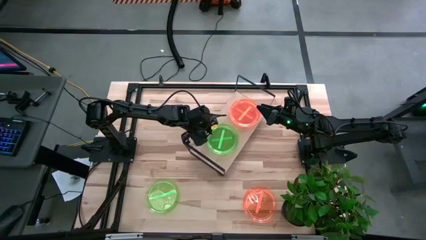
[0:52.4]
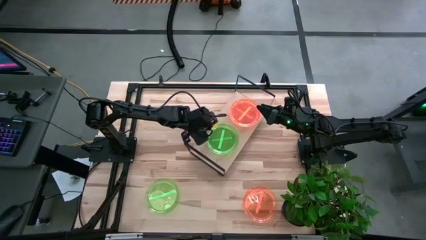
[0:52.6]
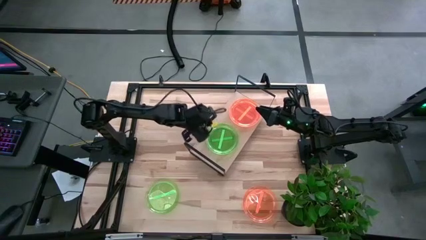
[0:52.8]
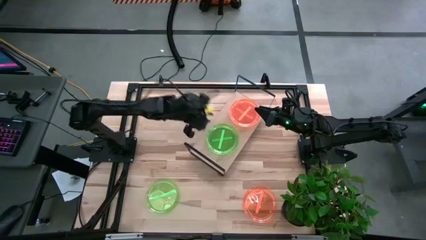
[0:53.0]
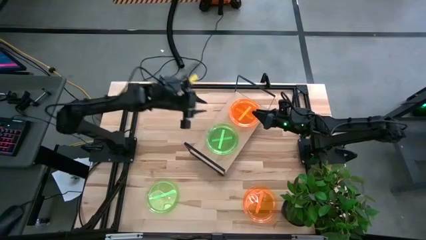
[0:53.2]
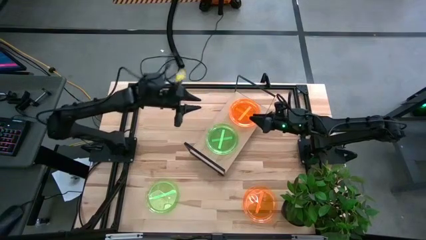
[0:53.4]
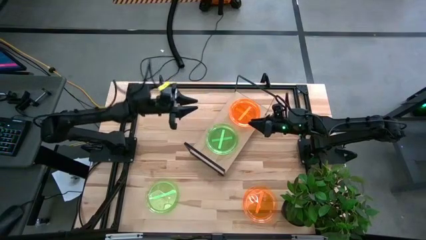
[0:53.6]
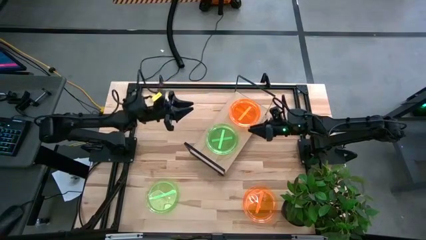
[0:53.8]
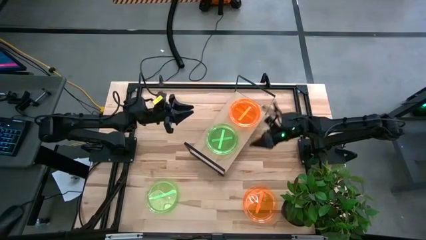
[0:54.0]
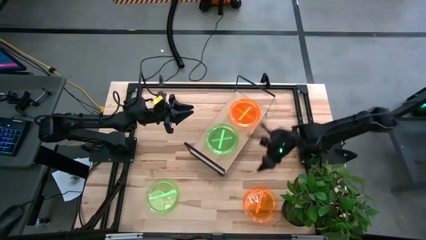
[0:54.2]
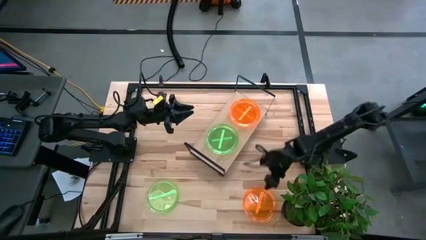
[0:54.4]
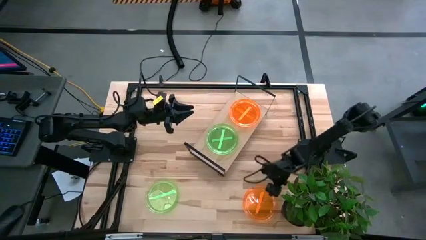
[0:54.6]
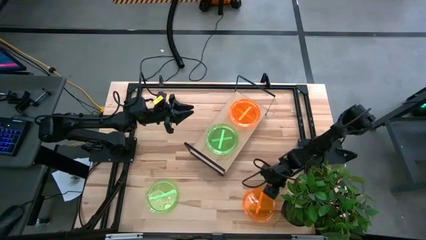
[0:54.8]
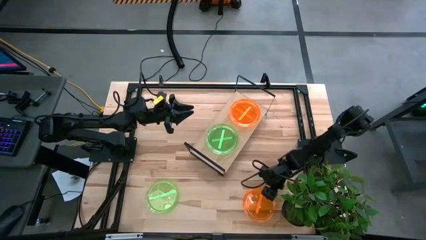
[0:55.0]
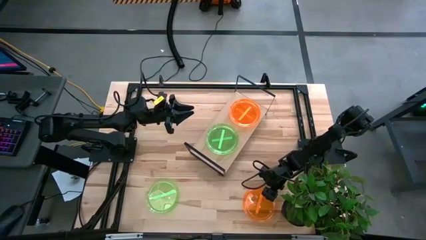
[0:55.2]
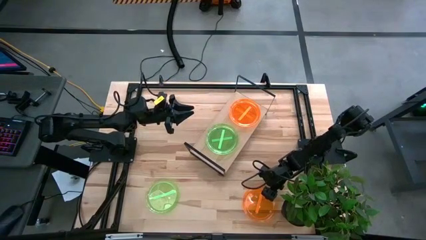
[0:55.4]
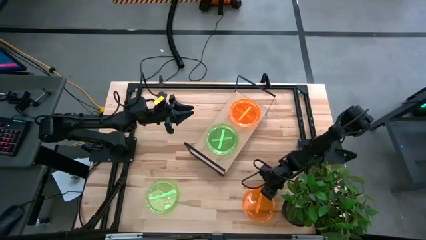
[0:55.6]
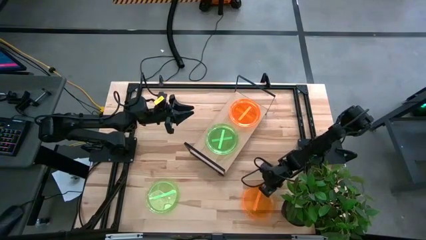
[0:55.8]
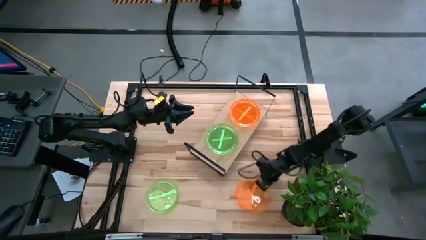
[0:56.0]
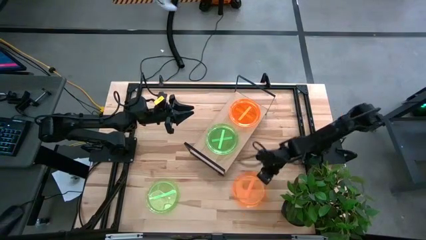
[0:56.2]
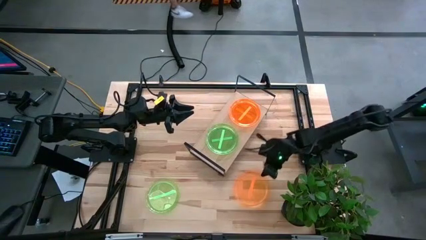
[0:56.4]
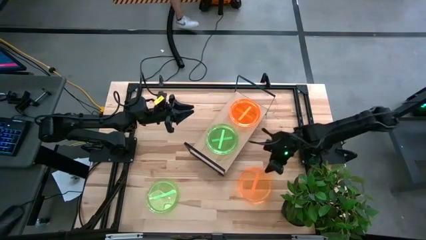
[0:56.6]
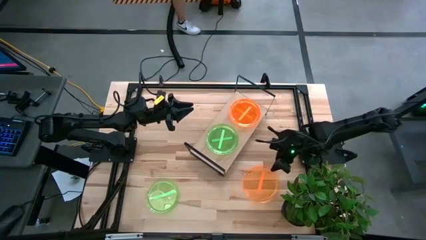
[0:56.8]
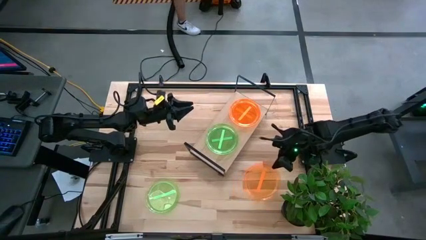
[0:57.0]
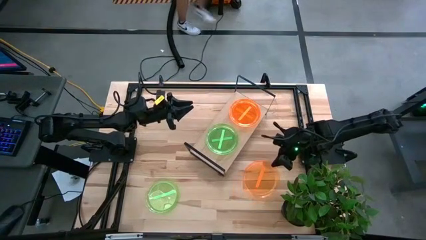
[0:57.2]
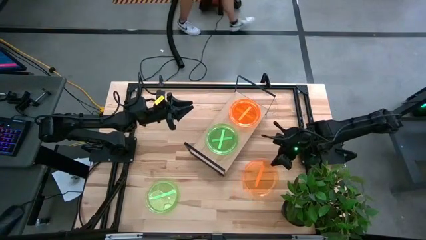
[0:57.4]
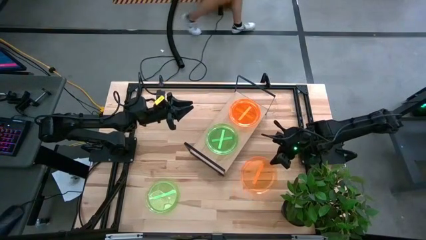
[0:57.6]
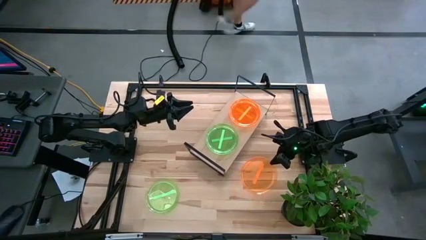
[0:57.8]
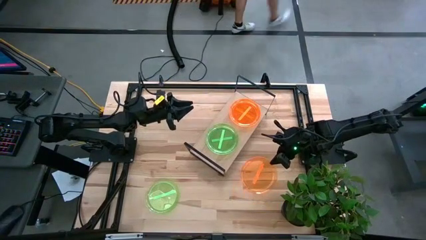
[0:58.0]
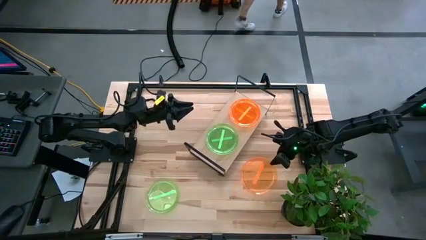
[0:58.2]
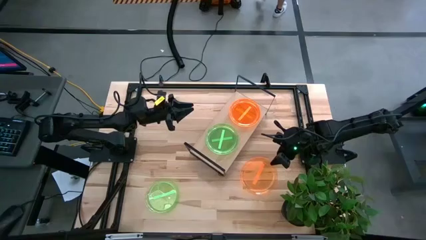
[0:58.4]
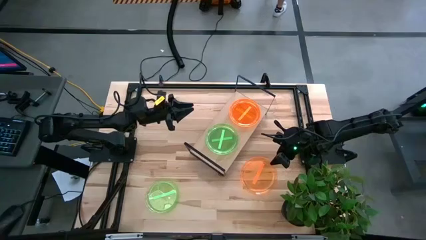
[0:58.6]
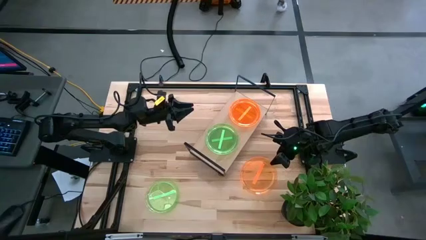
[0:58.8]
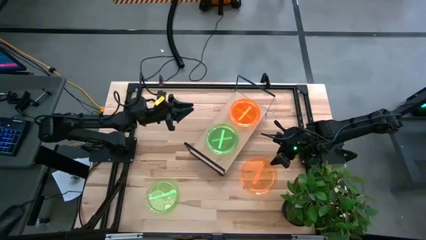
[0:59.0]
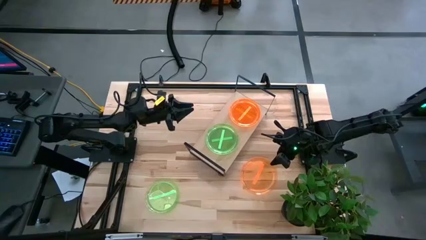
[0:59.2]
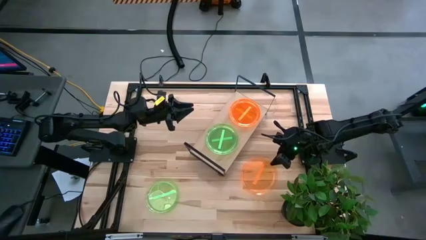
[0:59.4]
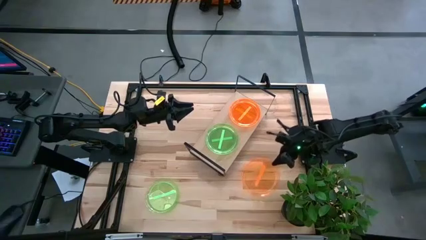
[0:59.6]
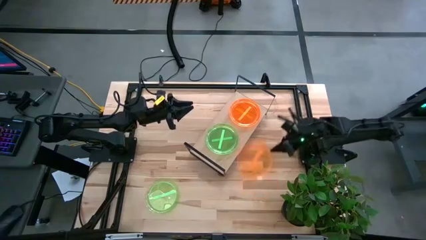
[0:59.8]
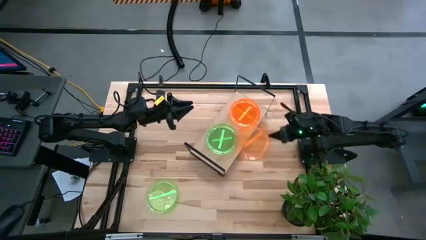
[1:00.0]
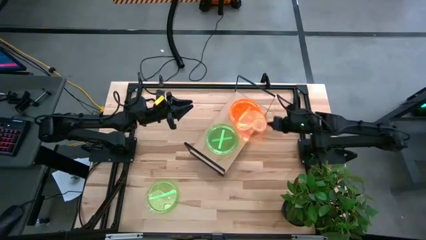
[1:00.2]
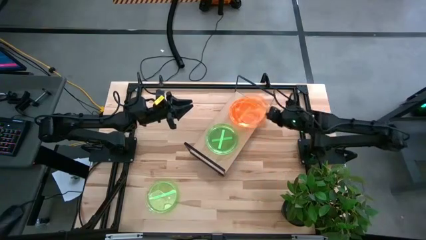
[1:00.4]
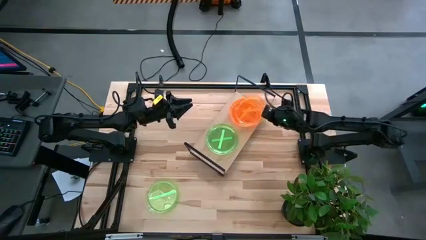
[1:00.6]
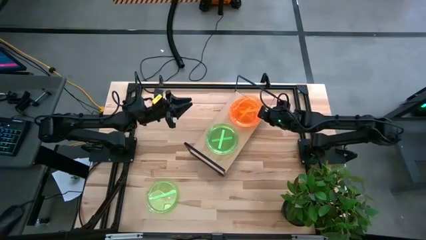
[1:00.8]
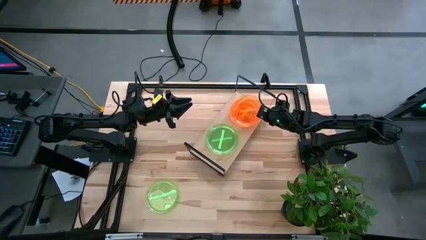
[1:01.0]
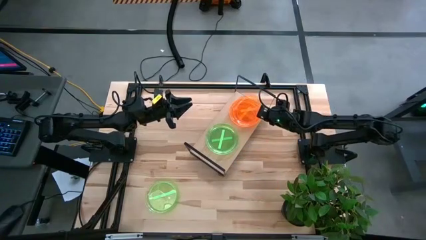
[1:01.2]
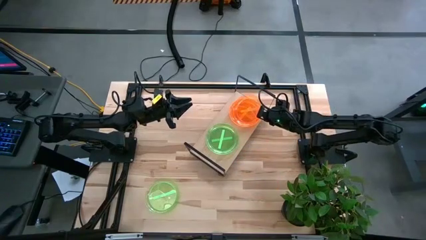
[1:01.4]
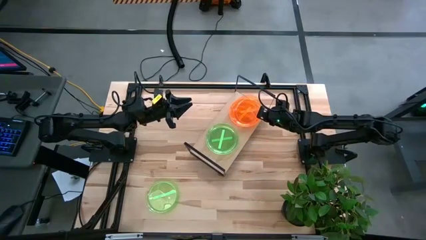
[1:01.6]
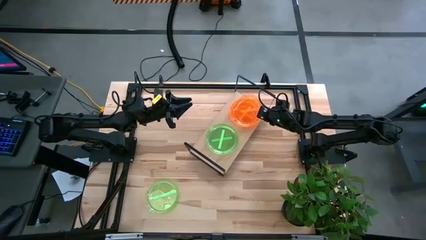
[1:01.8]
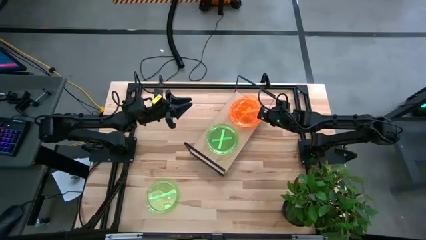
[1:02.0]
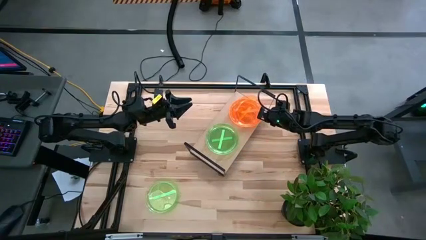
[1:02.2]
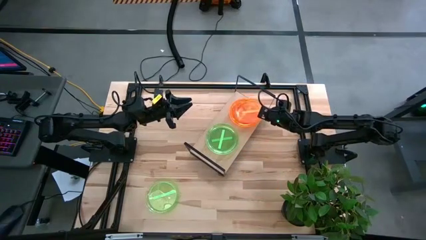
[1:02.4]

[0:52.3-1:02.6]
Task: Place and stack plates onto a shelf
Stack the orange plate on top of the orange plates on the shelf

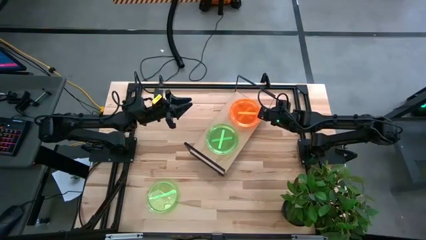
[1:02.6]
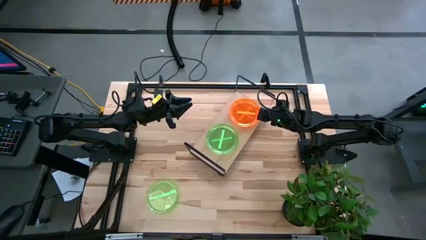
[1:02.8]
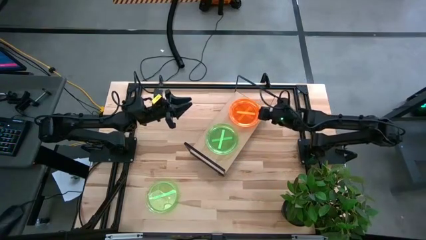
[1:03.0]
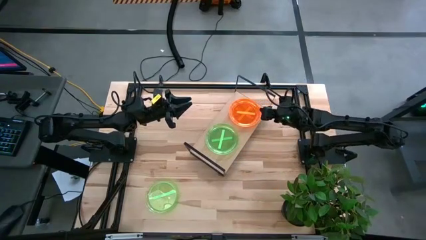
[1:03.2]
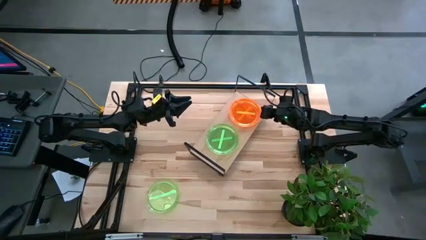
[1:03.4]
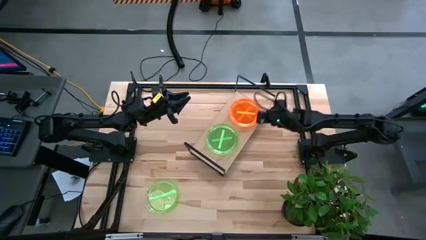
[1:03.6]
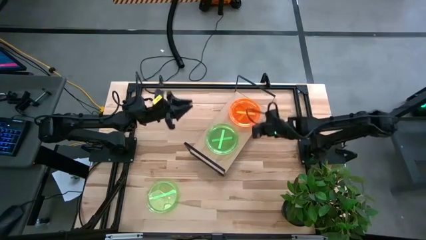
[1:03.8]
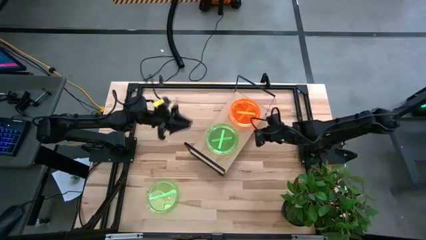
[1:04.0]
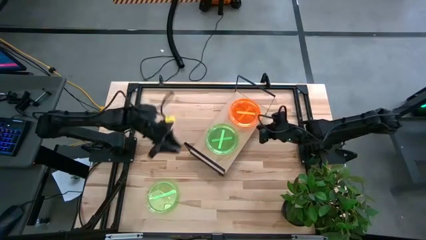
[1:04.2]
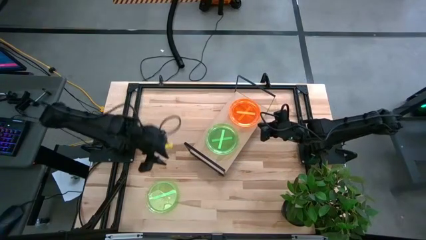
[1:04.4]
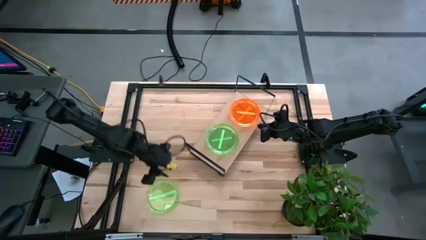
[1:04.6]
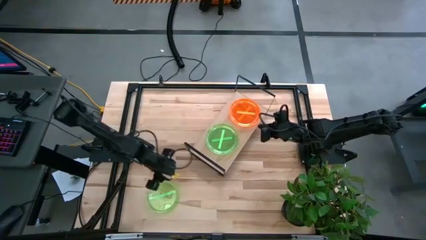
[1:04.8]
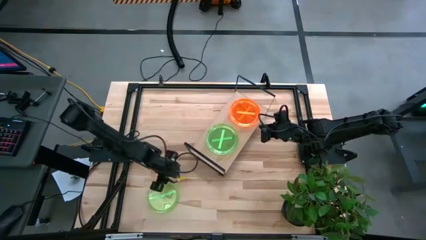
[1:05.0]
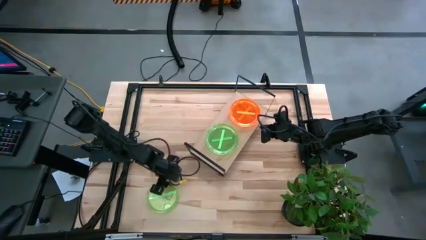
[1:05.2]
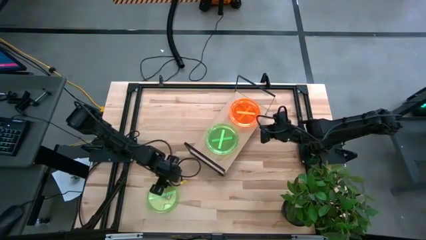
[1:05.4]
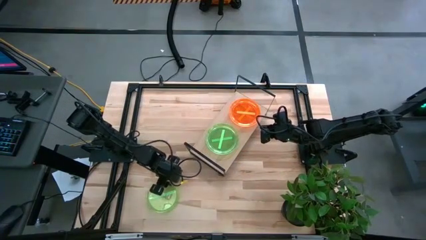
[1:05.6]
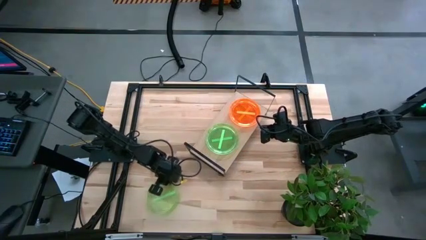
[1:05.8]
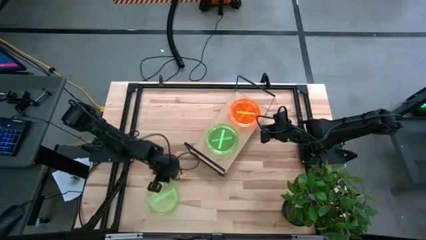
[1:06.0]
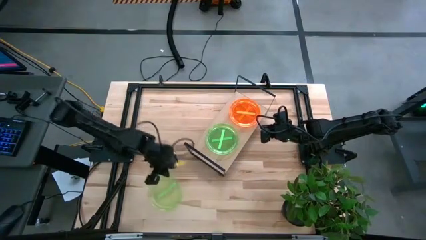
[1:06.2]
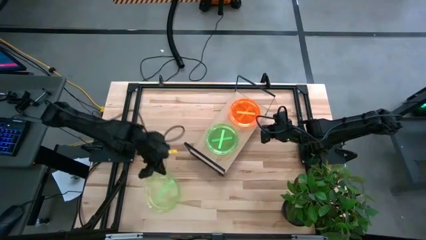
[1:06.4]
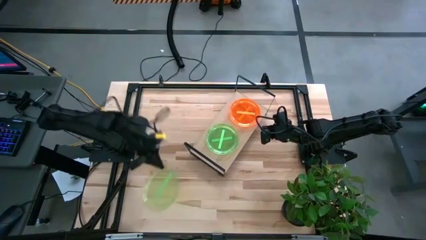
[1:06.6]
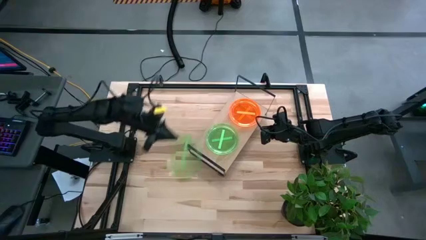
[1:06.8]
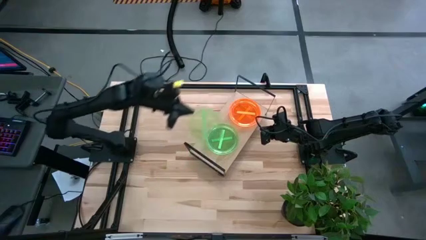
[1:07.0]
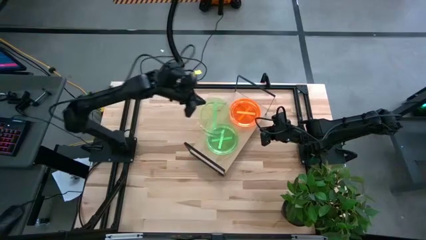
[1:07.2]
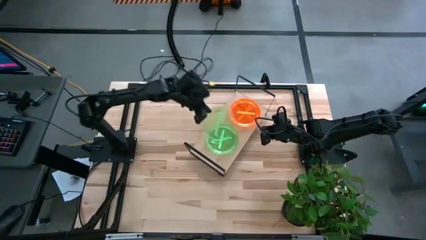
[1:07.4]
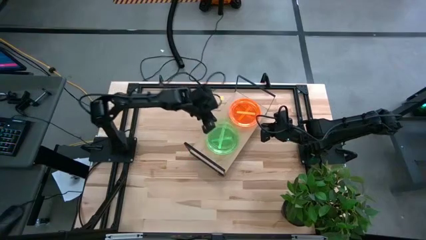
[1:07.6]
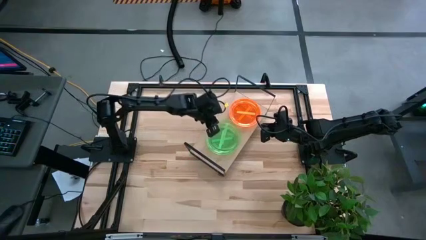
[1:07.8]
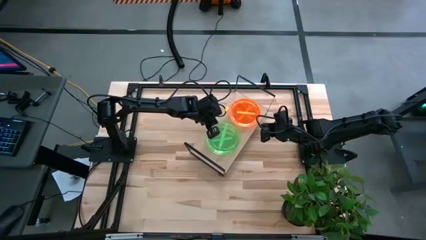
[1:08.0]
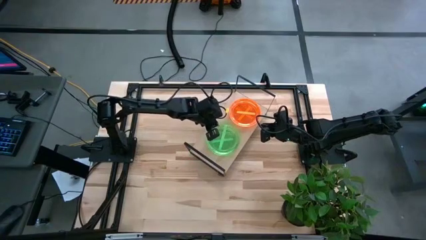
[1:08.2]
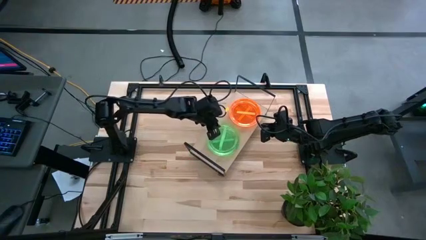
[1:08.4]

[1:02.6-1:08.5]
Stack the green plate on top of the green plates on the shelf
